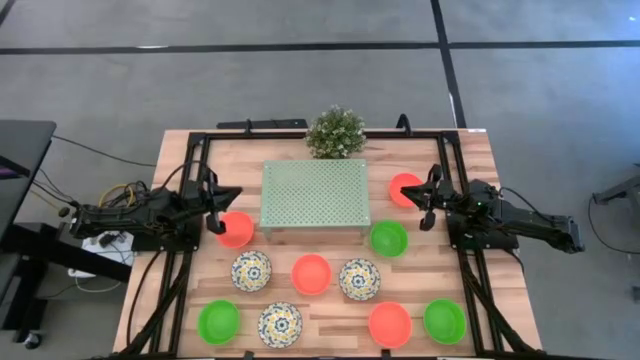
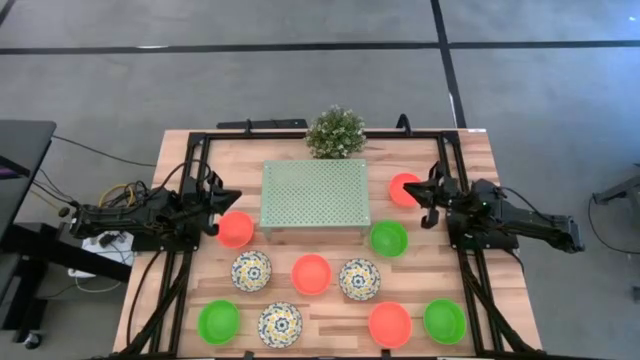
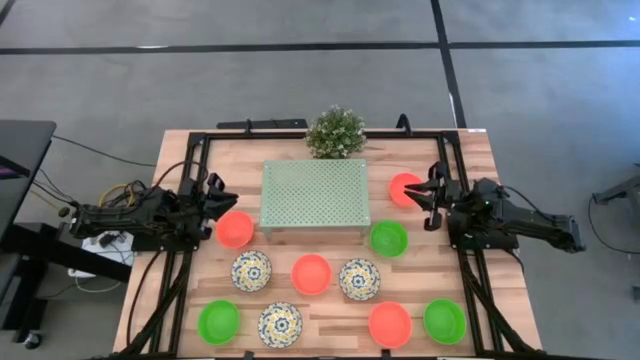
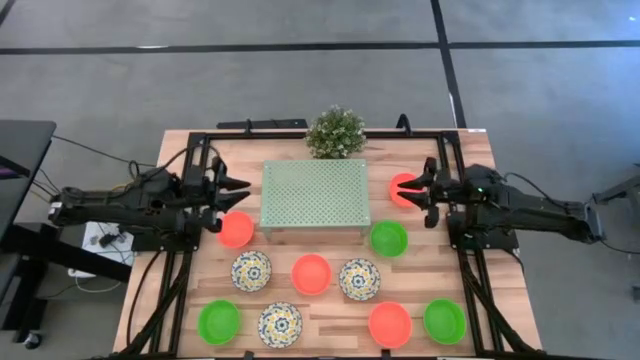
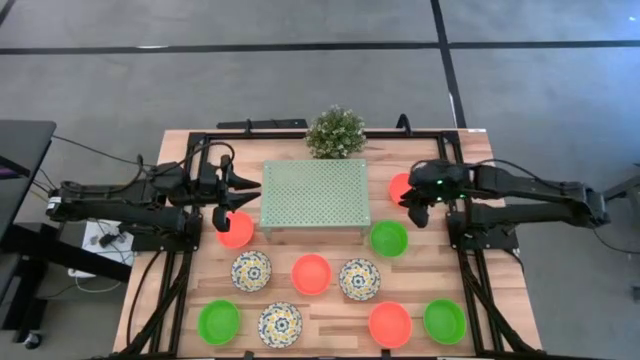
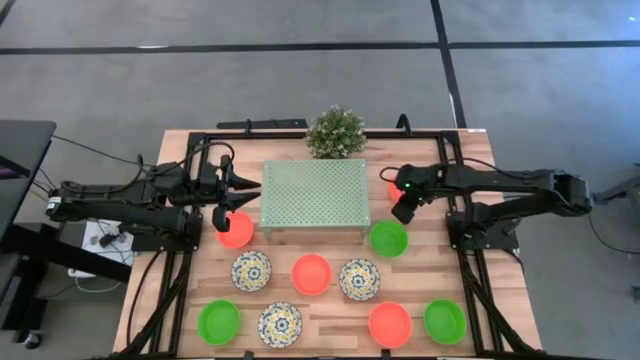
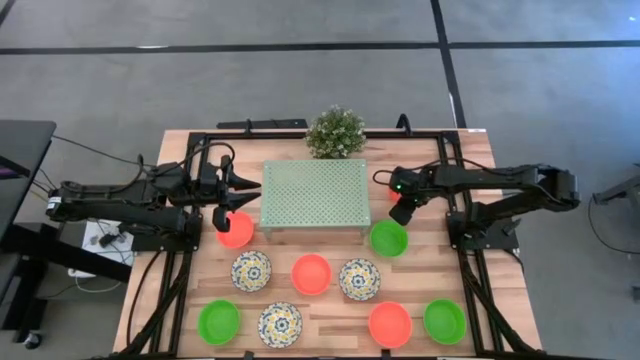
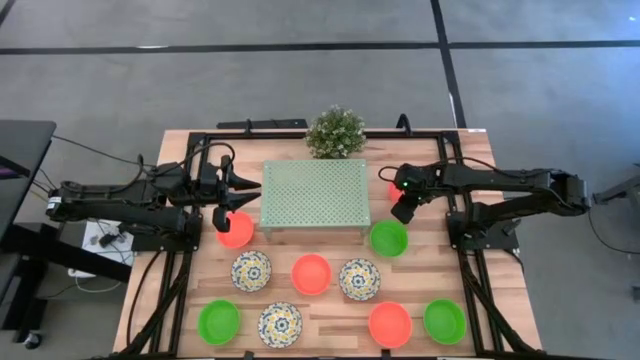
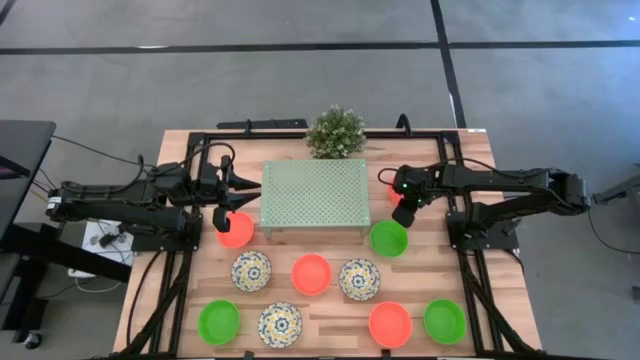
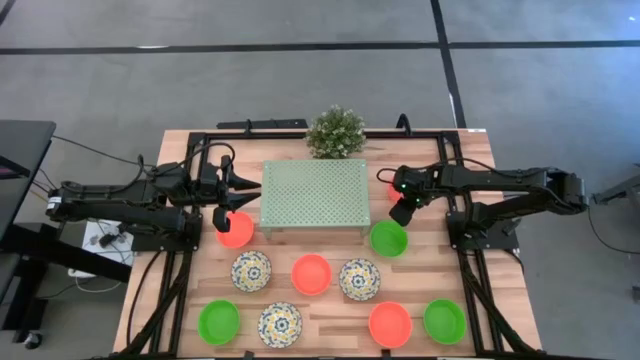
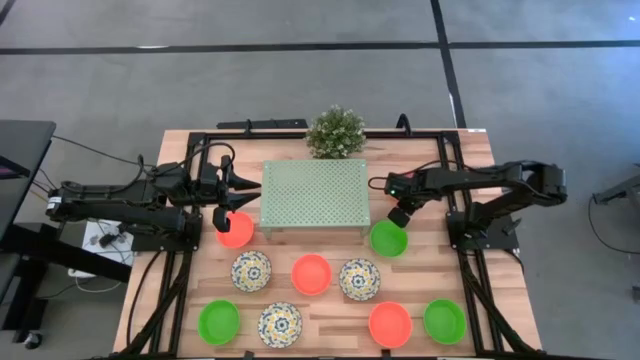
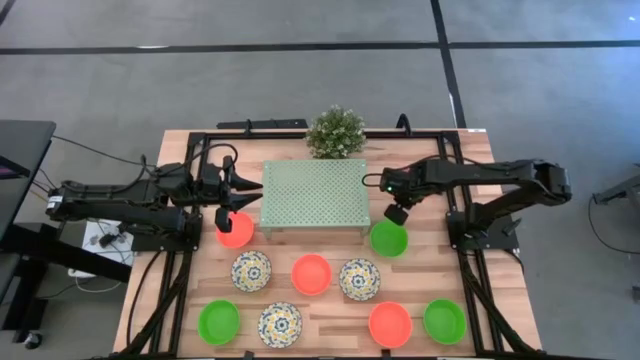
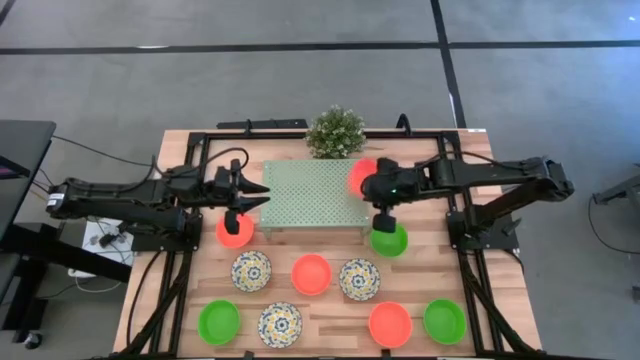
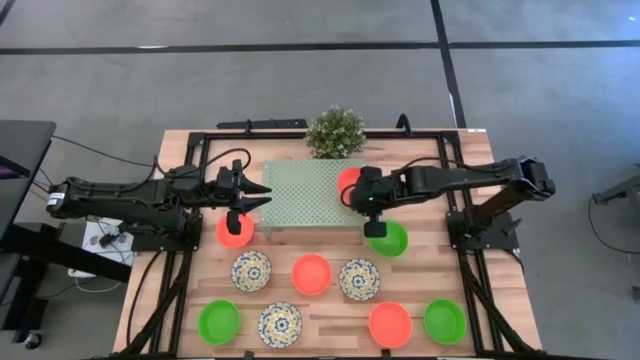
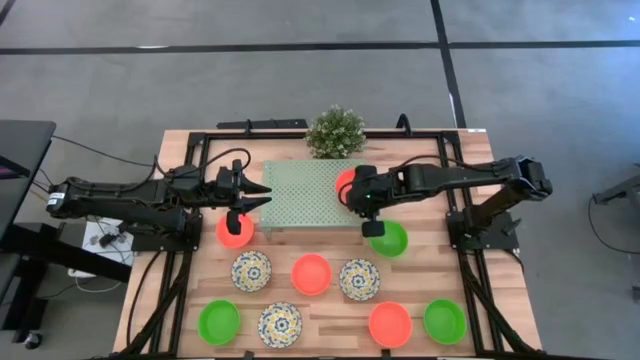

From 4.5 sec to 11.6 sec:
Task: Pick & Place Mini bowls
Put the orange bowl on the shelf

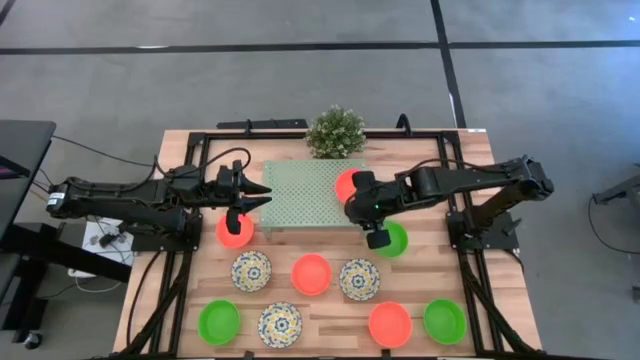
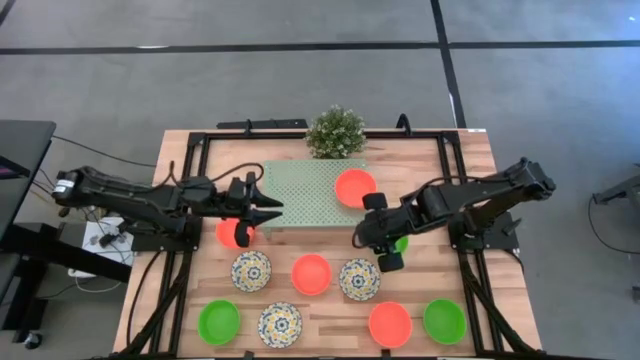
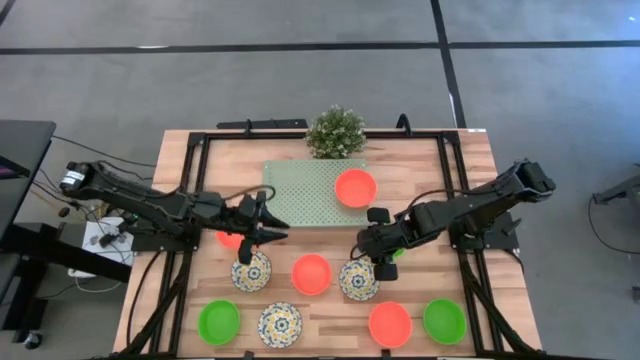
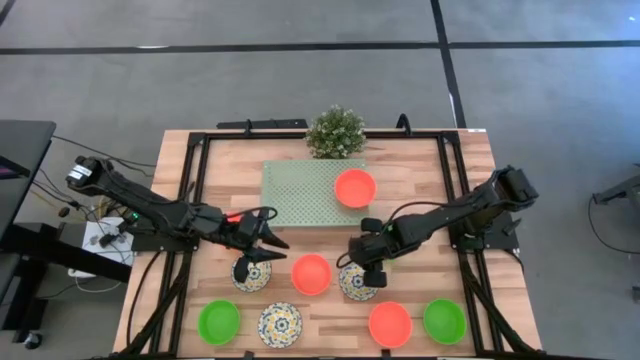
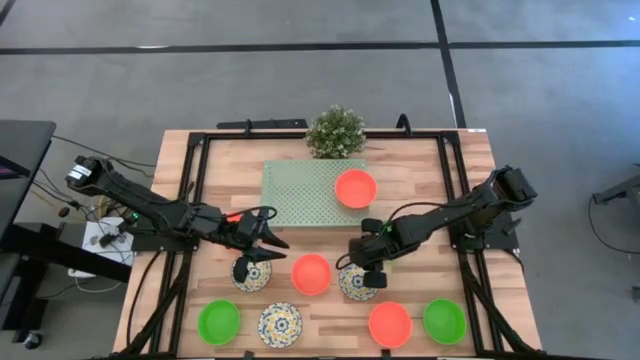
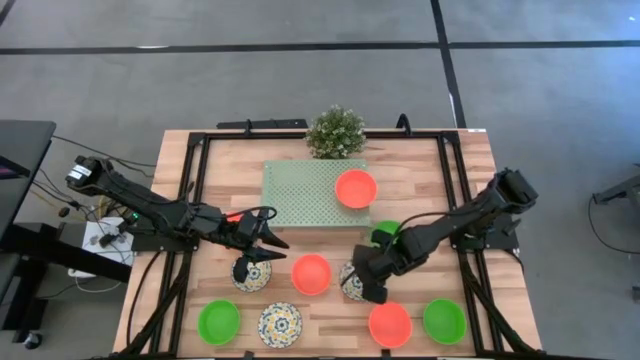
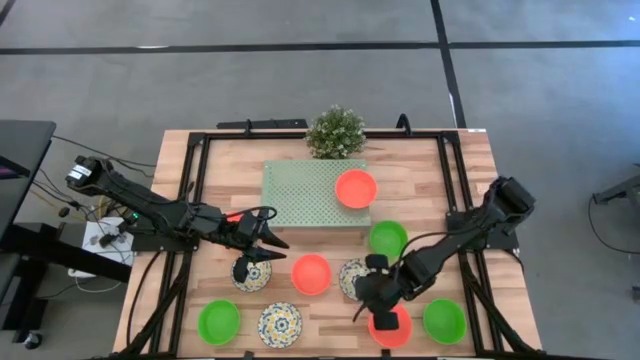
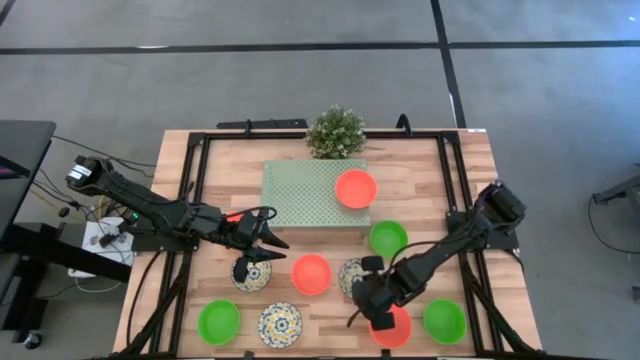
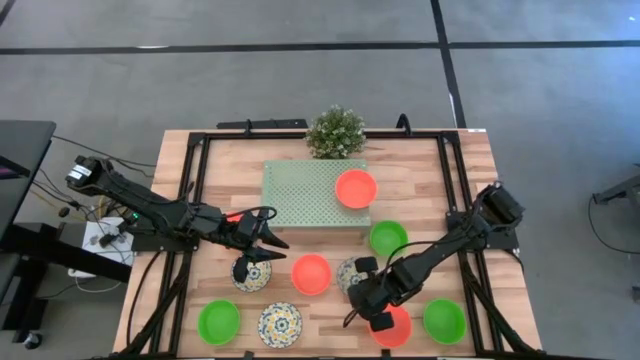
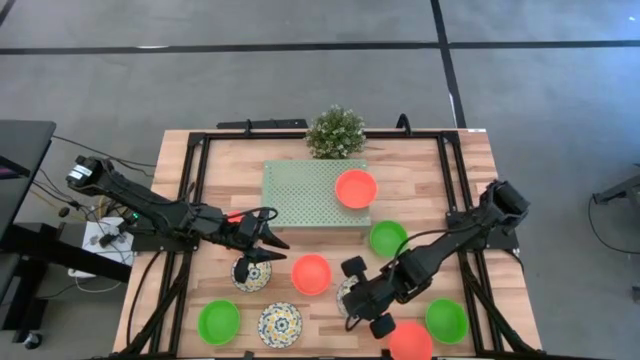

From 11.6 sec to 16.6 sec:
Put the yellow patterned bowl on the shelf

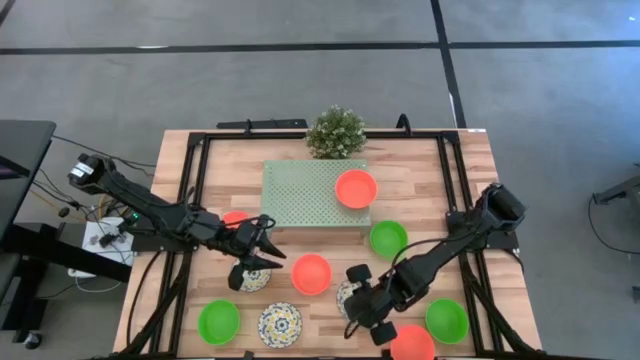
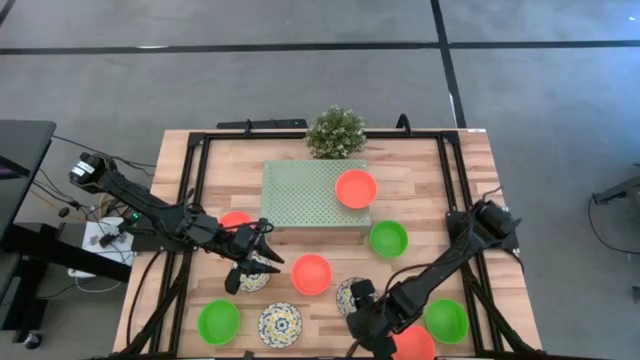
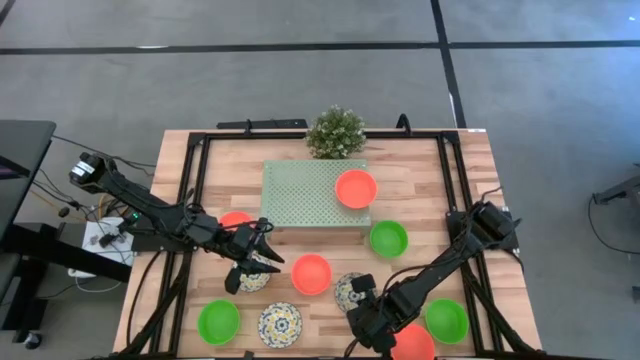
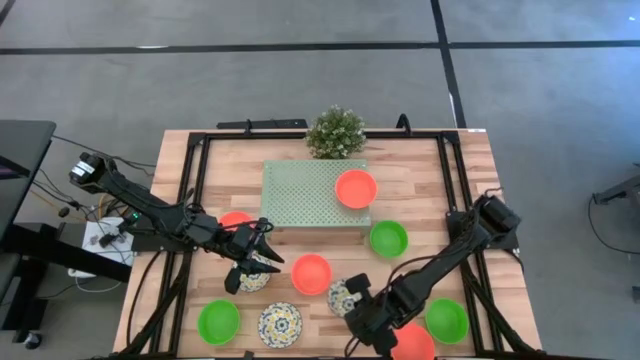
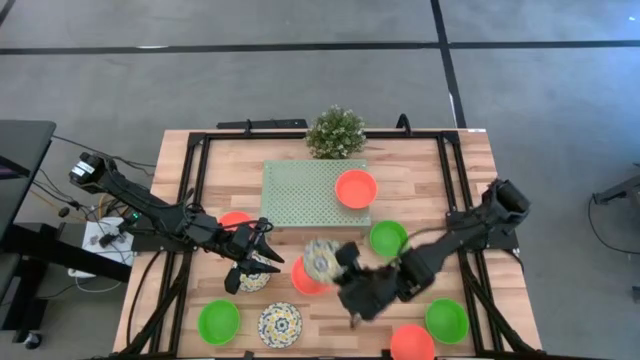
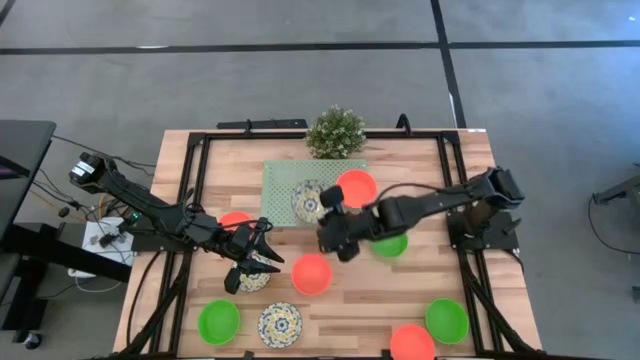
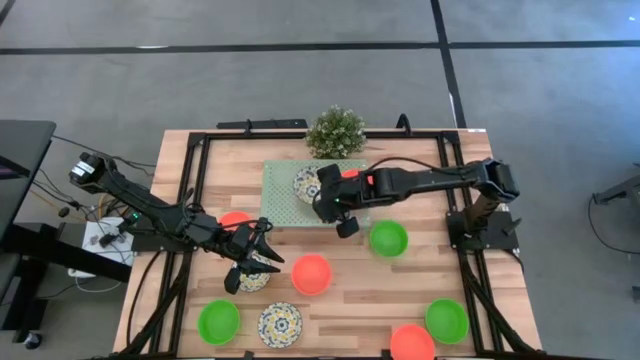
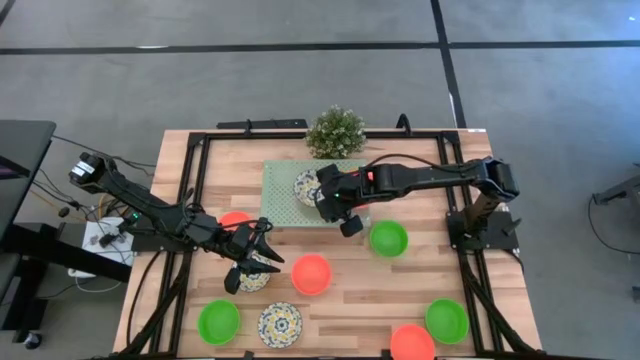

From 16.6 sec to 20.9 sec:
Put the yellow patterned bowl on the shelf

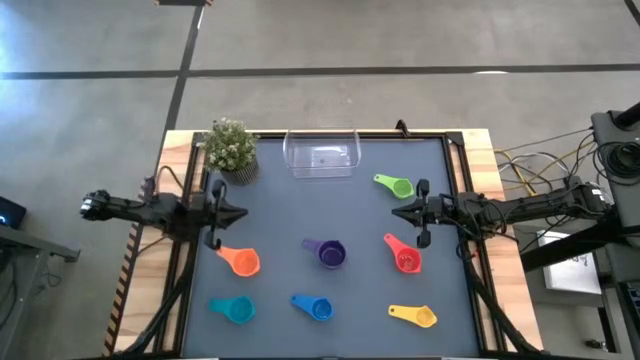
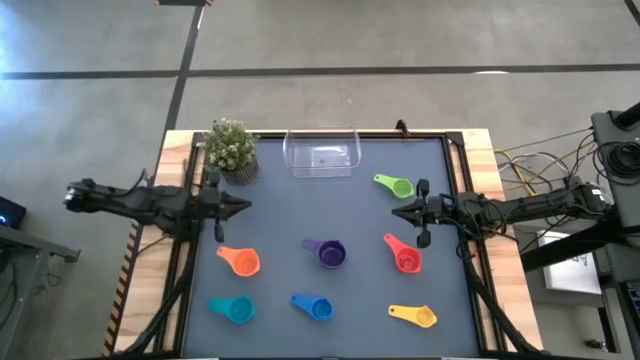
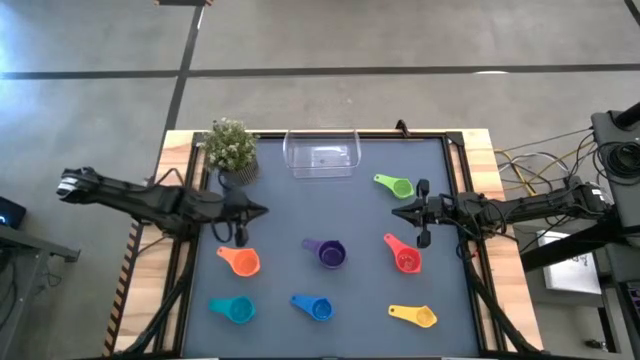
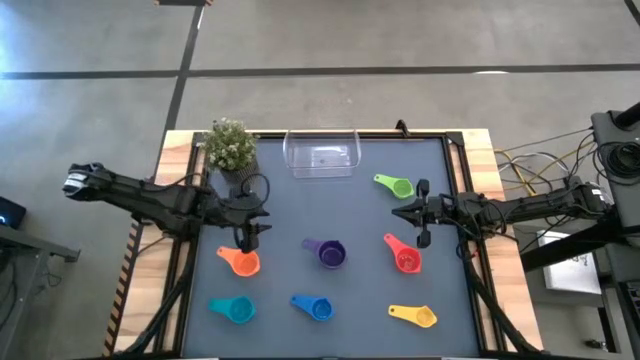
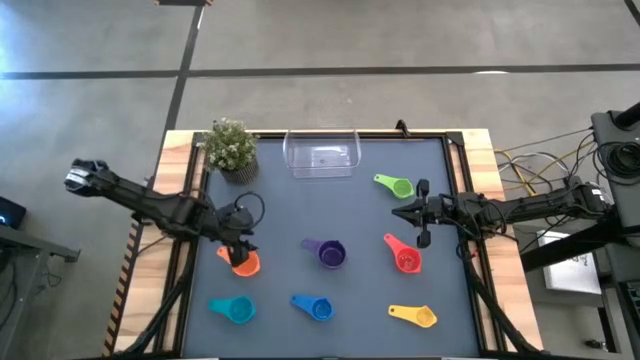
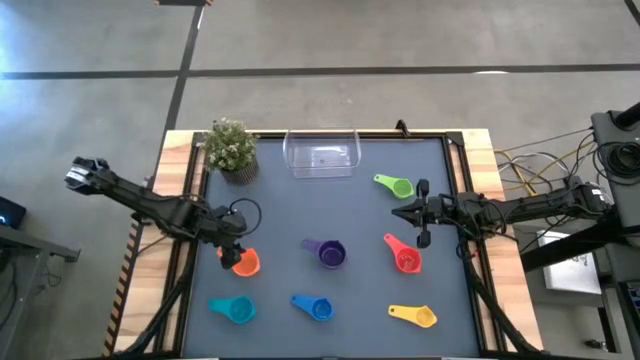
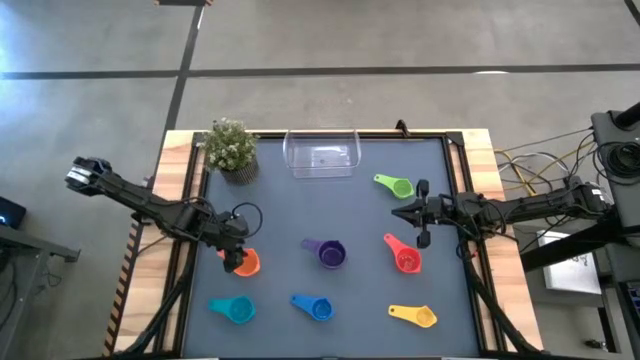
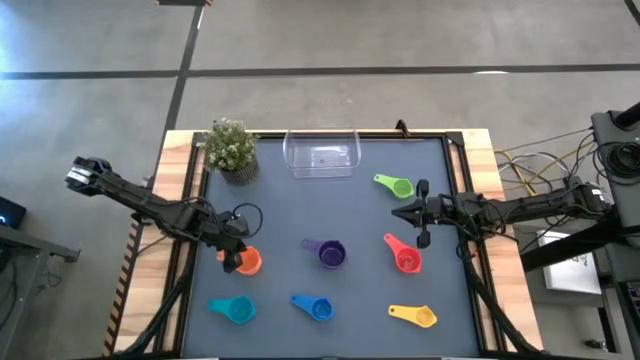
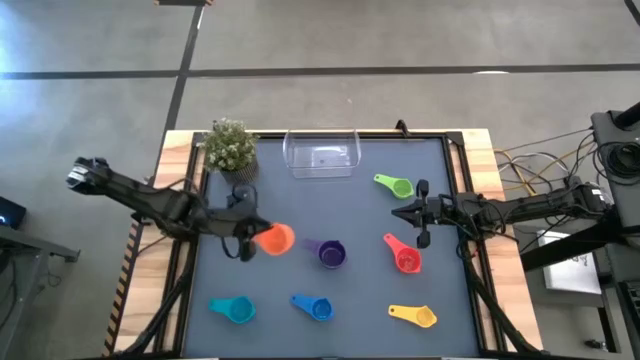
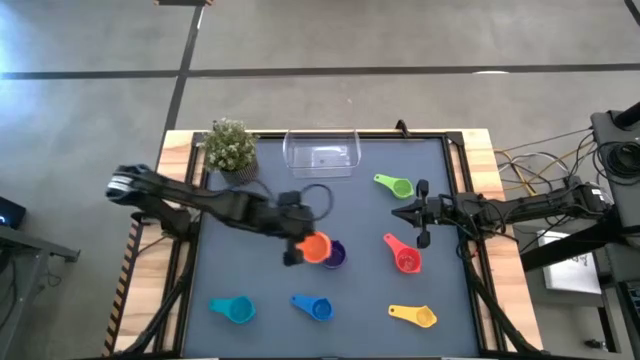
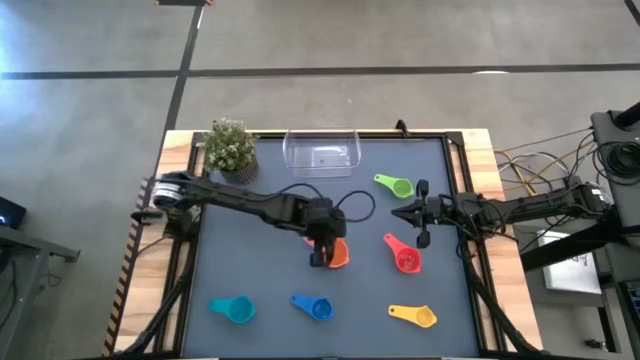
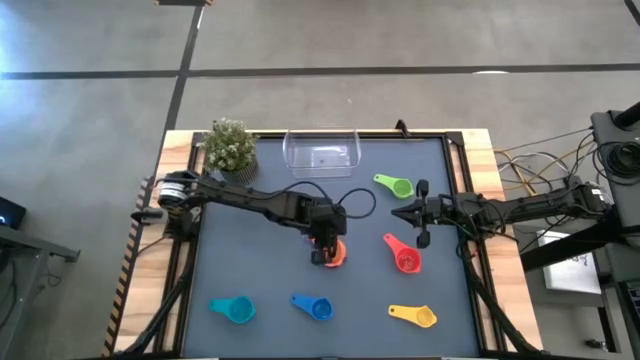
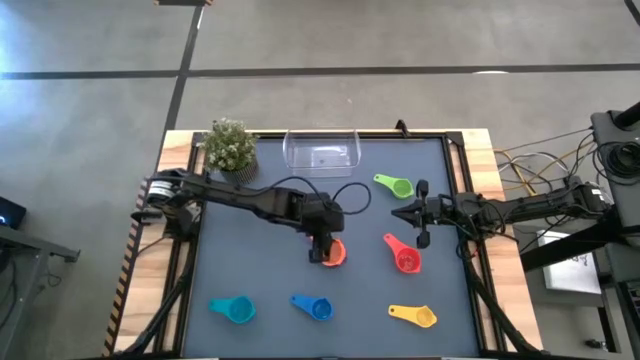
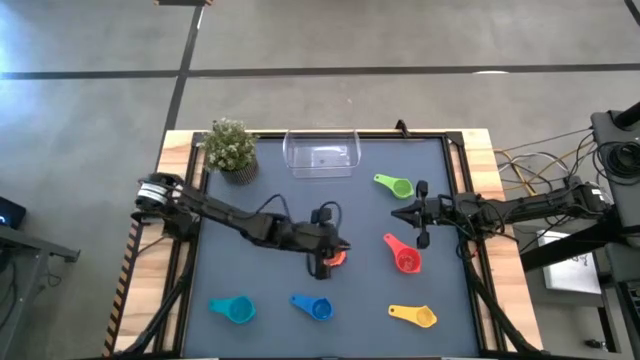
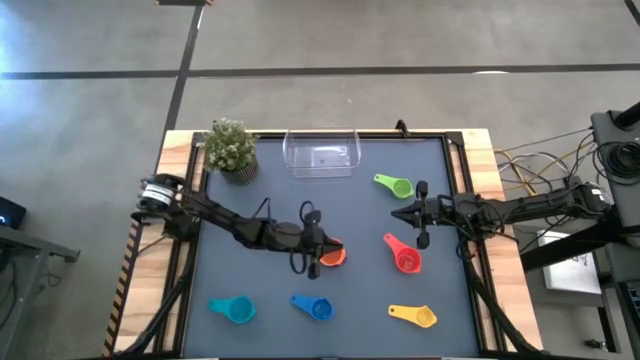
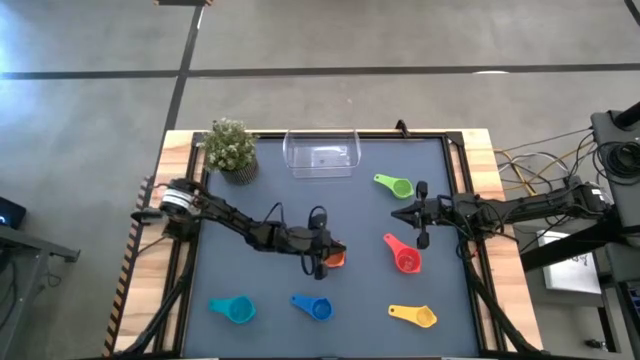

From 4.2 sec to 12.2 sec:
Task: Nest measuring cups in basket
Stack the orange measuring cup on top of the purple measuring cup
